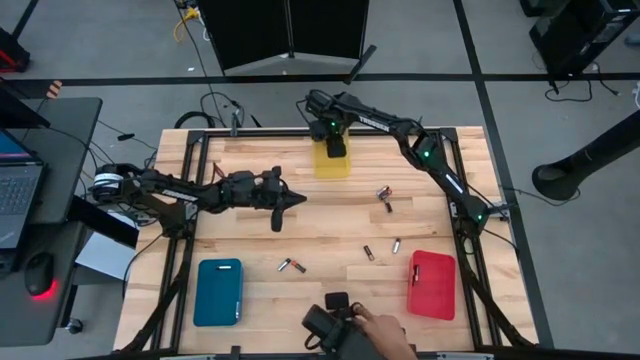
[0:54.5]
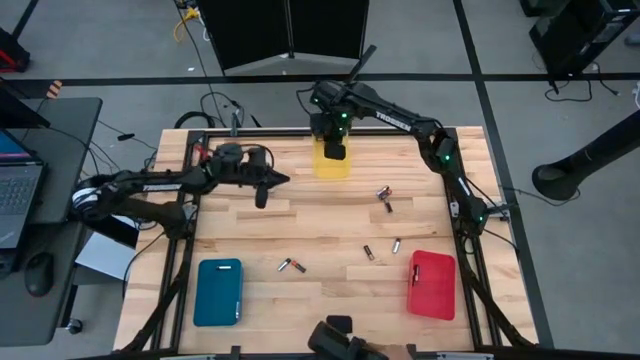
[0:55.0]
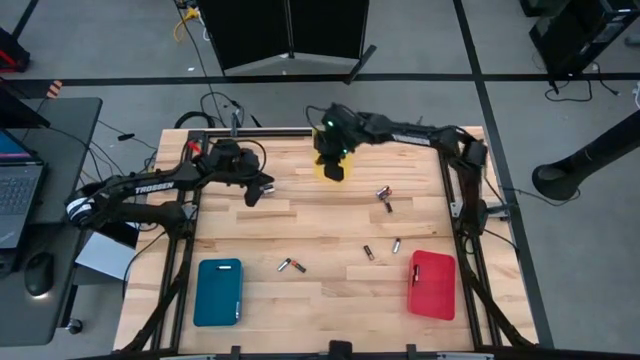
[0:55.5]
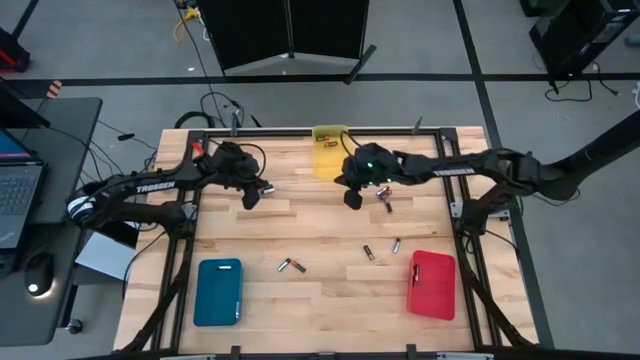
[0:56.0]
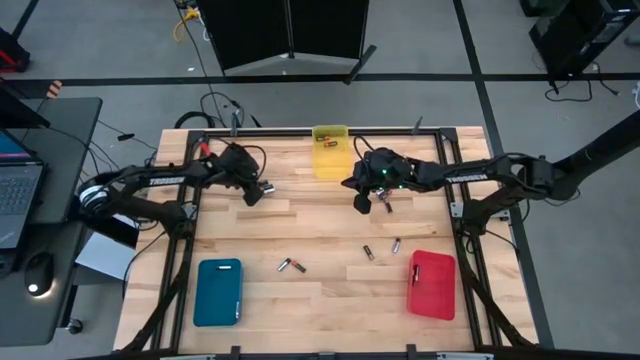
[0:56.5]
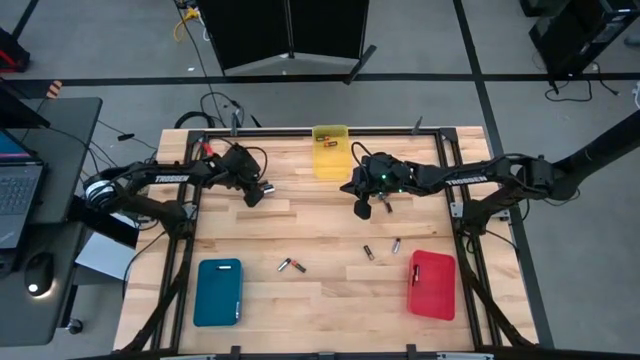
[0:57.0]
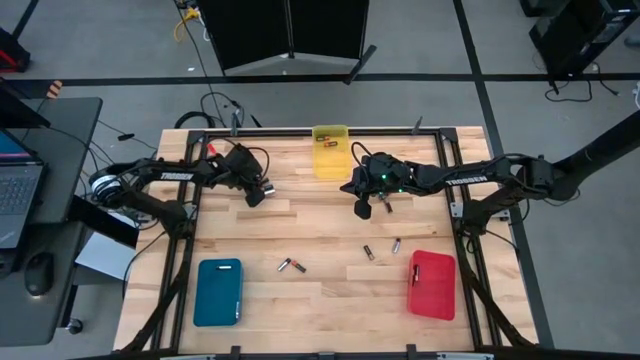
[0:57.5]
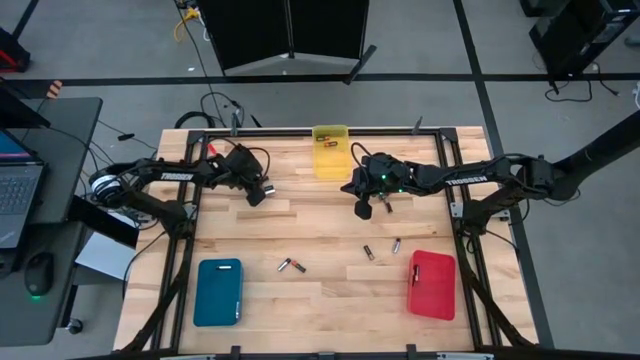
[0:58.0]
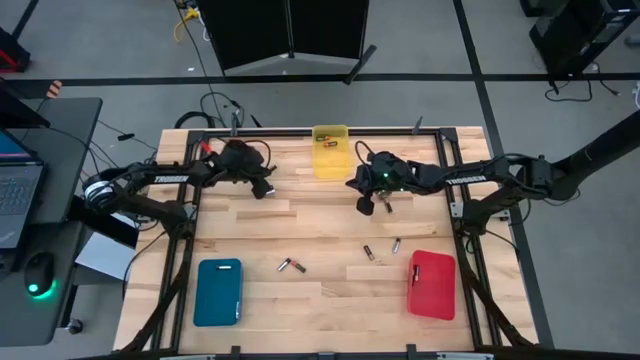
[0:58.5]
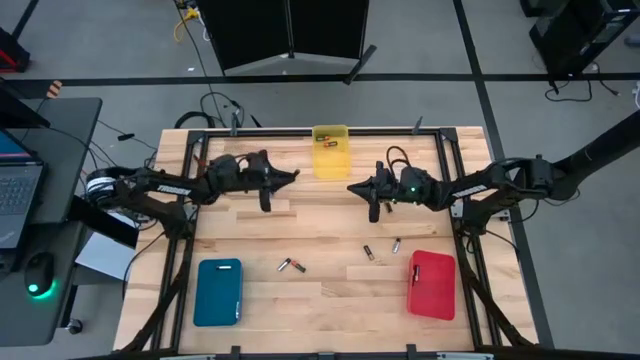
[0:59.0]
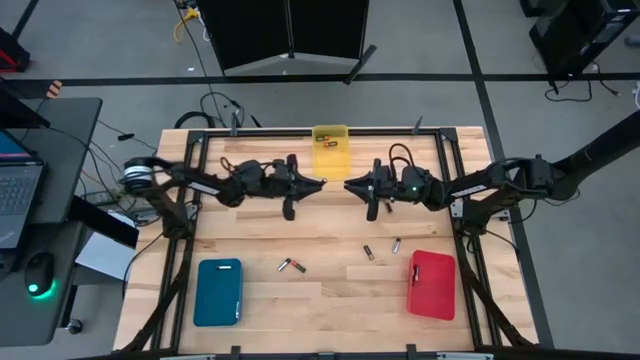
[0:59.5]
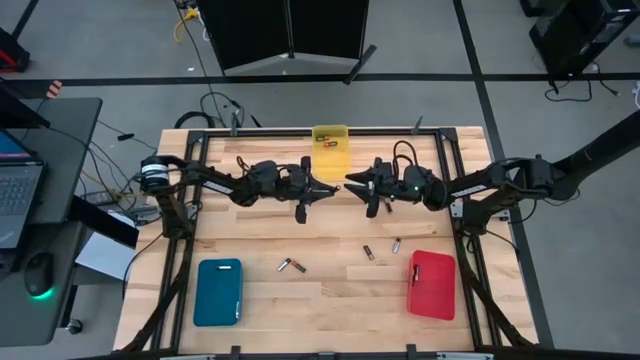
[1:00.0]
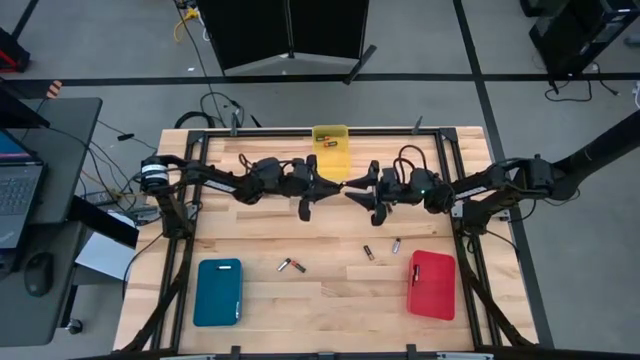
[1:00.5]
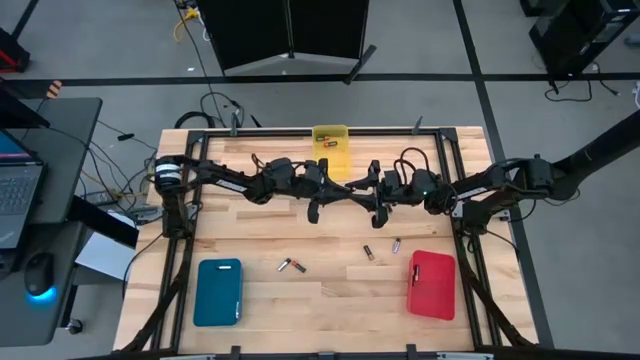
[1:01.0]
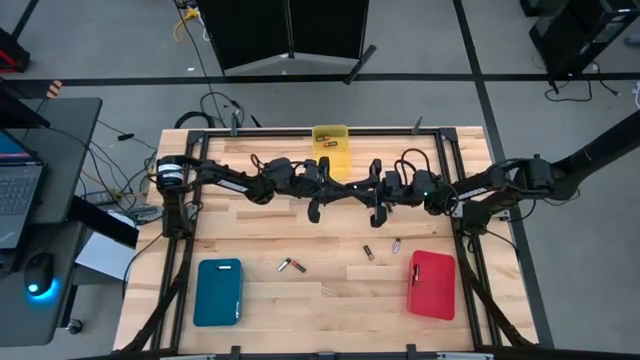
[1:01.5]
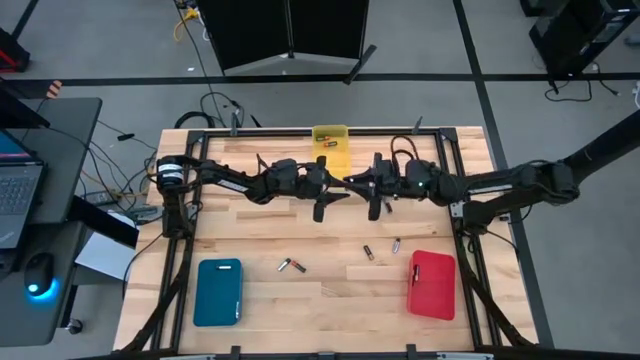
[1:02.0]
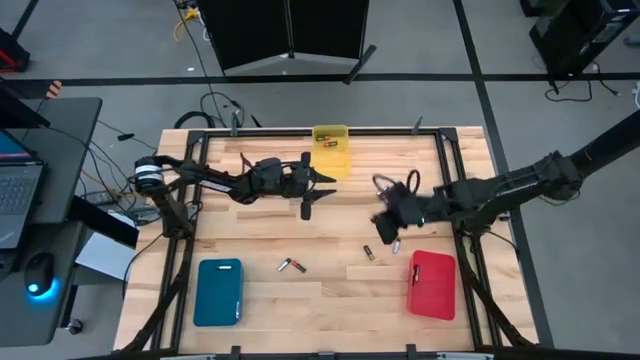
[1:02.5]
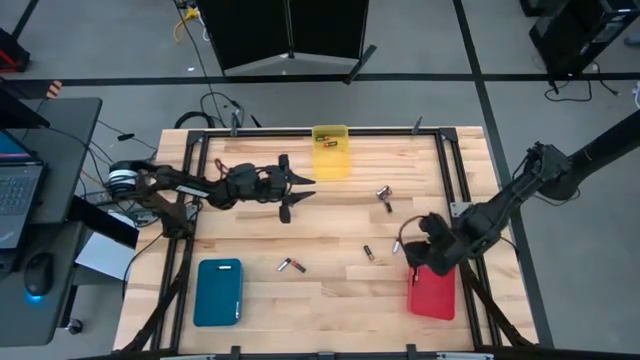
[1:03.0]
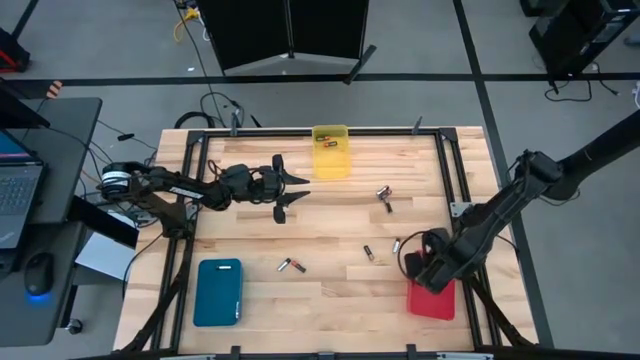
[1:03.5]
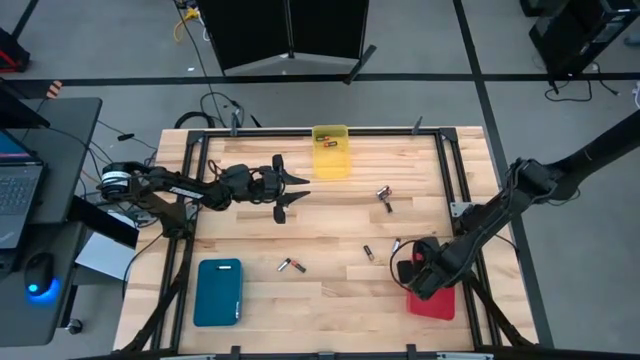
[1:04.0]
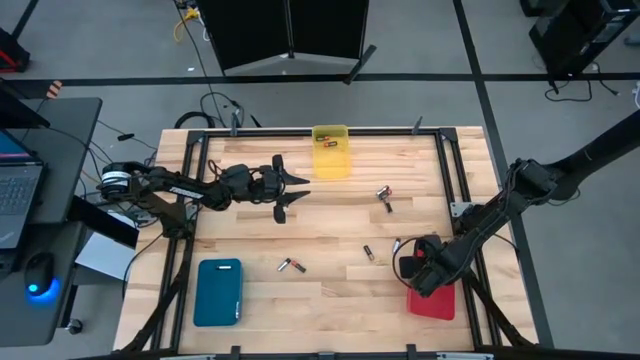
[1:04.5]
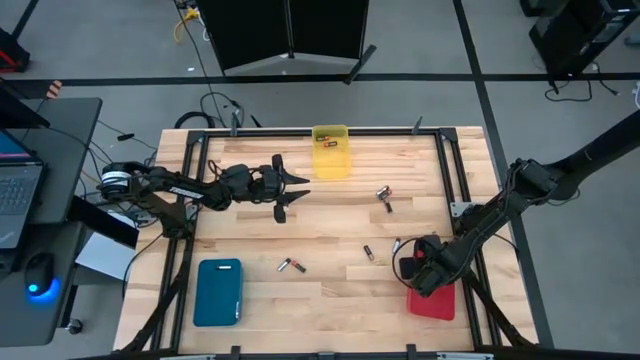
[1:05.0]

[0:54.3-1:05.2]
Task: Sort batteries
Put the golden battery into the red bin

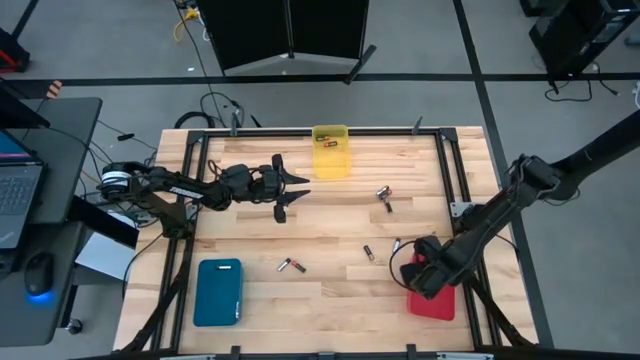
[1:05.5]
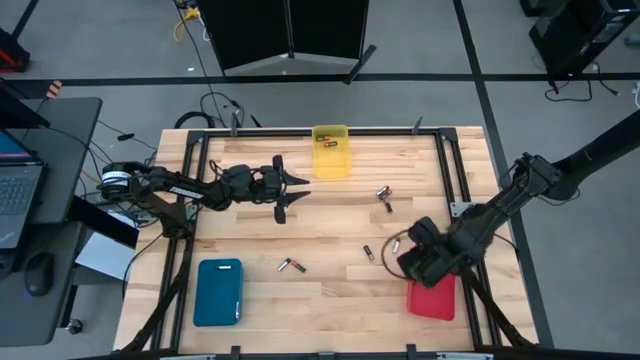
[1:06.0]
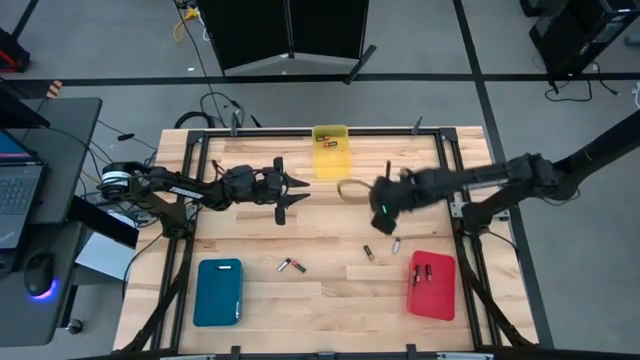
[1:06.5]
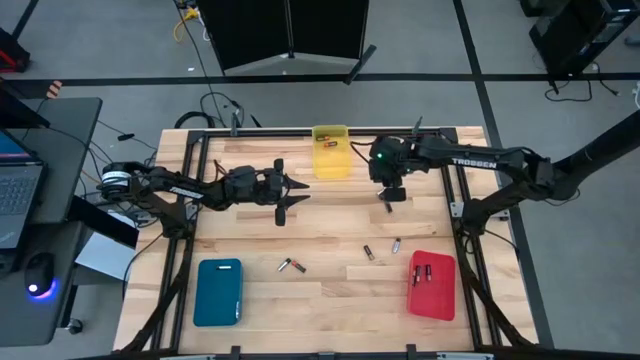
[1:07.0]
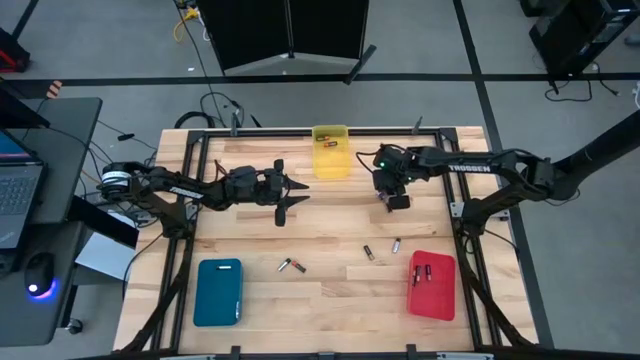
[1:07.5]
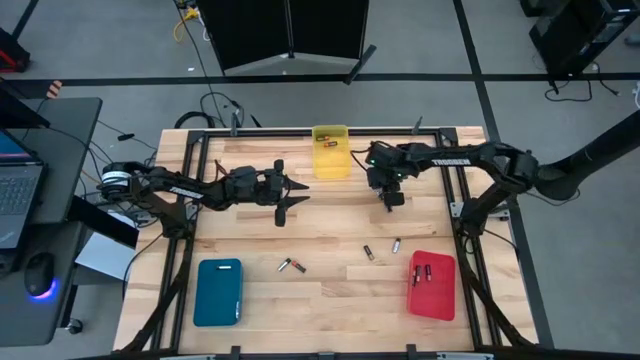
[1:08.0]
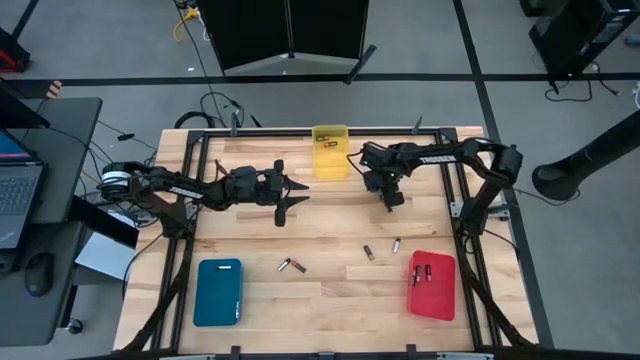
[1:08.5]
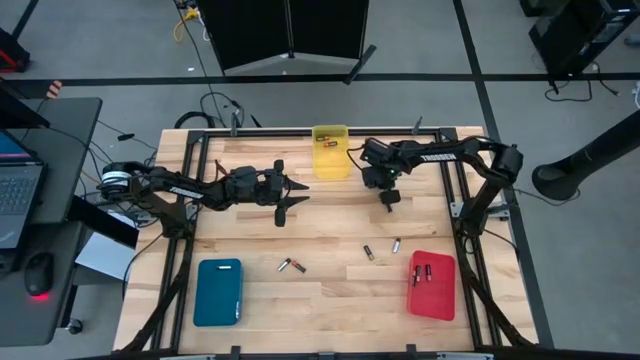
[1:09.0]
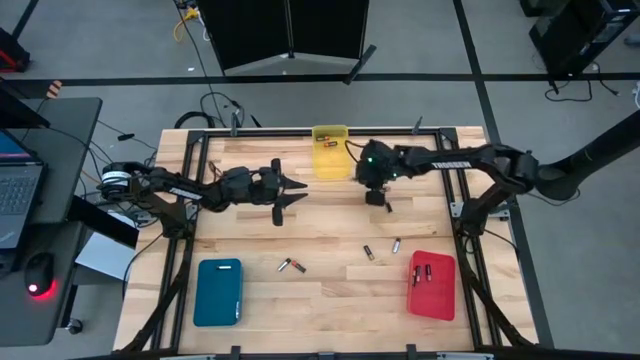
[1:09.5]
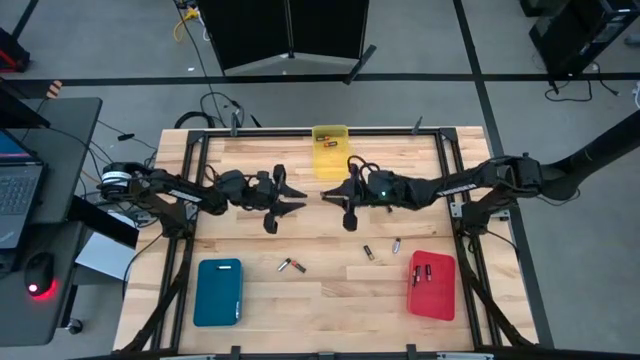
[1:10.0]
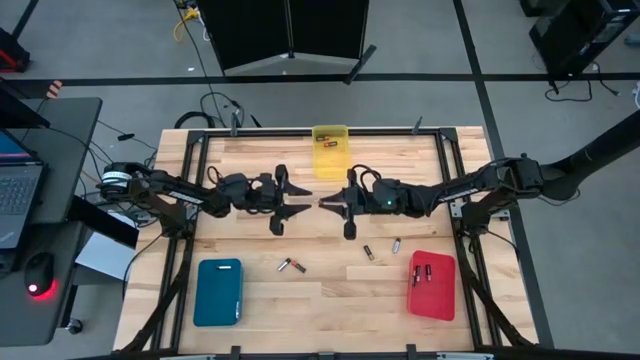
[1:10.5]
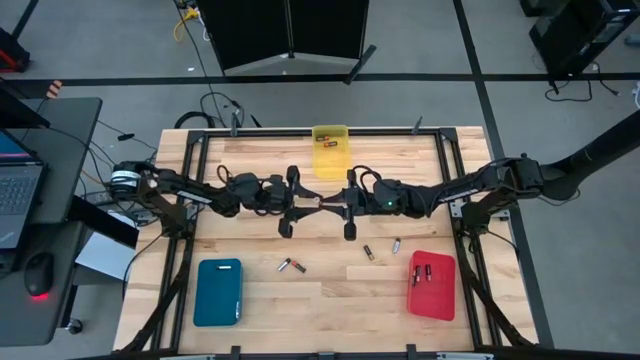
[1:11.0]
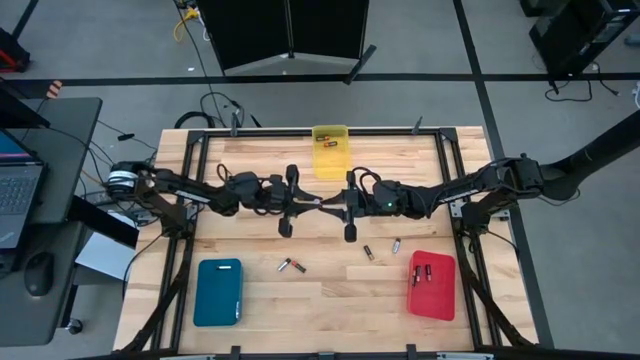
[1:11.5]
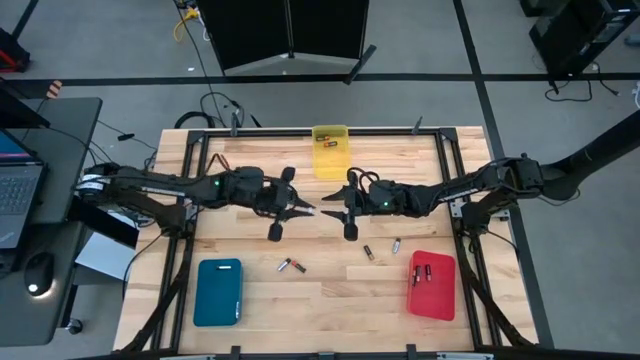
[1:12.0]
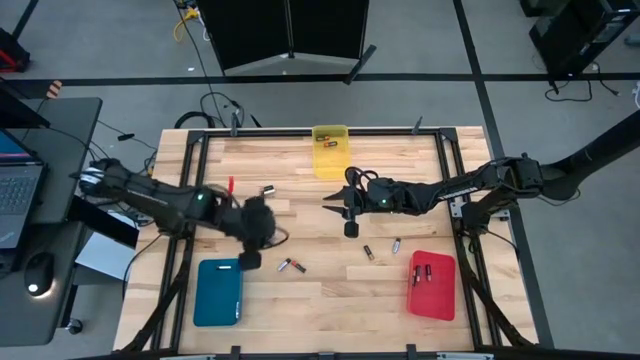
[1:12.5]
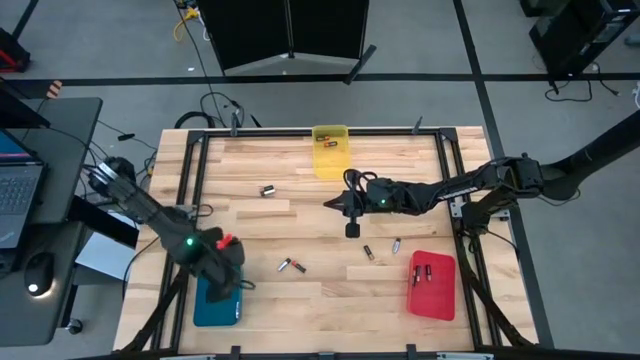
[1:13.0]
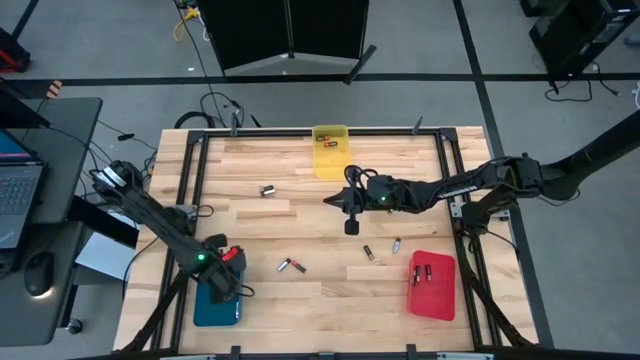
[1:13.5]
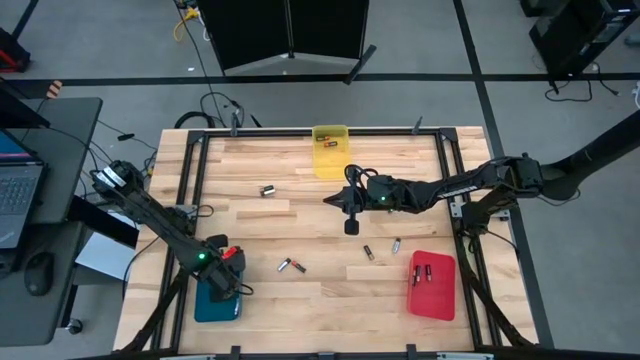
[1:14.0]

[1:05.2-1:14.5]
Put the silver battery into the blue bin

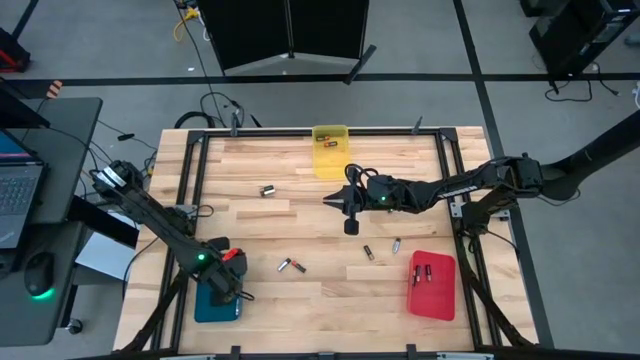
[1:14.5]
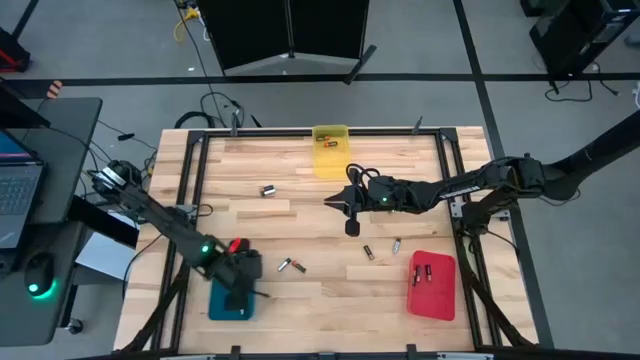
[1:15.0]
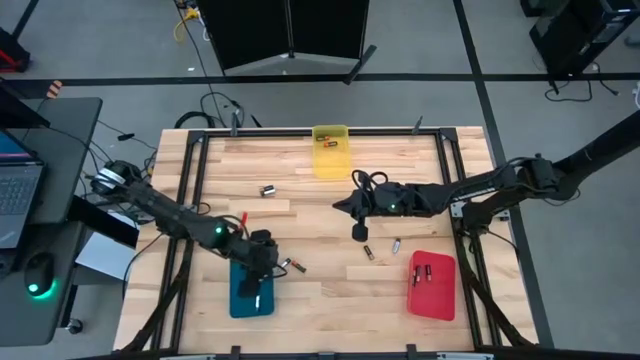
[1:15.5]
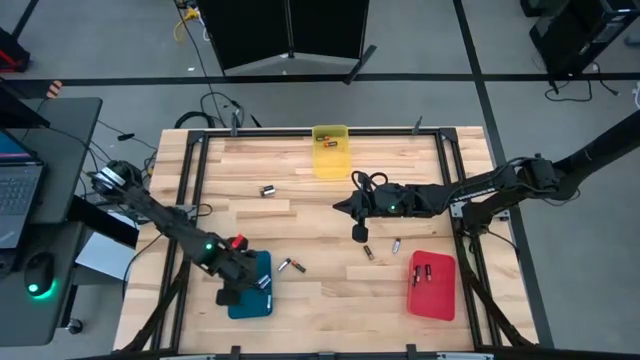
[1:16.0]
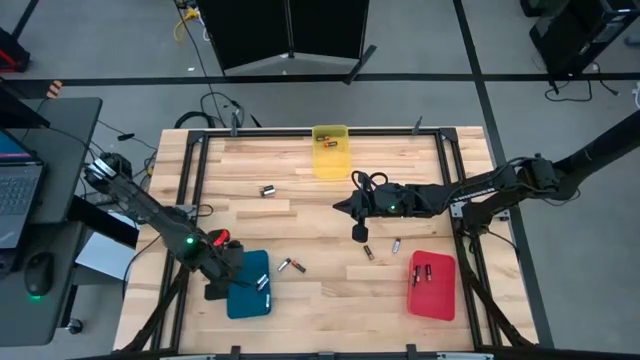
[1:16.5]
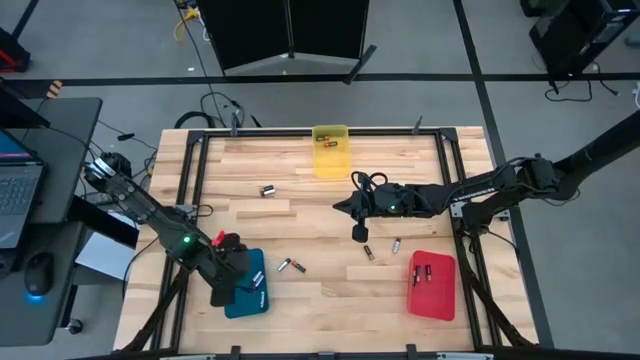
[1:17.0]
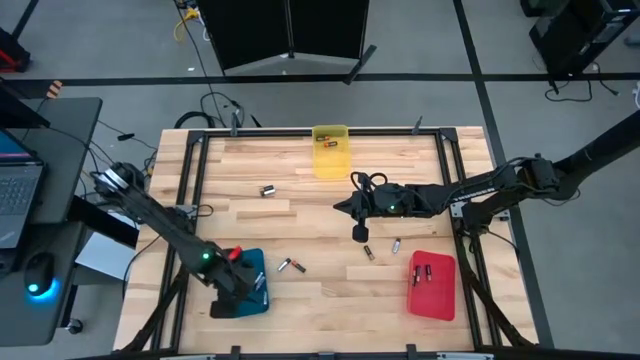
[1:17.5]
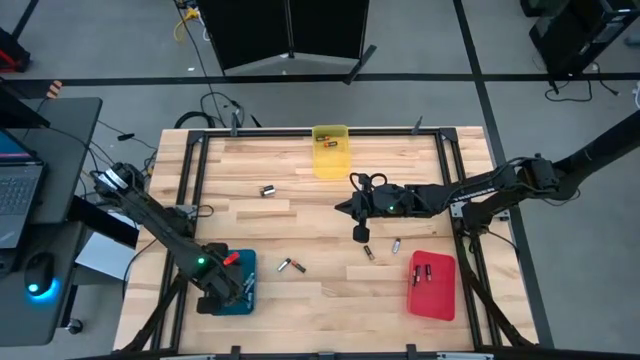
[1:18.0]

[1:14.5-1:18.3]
Adjust the blue bin
